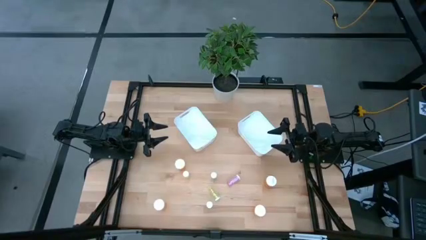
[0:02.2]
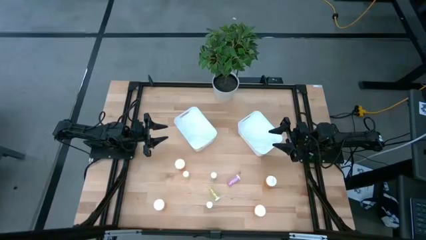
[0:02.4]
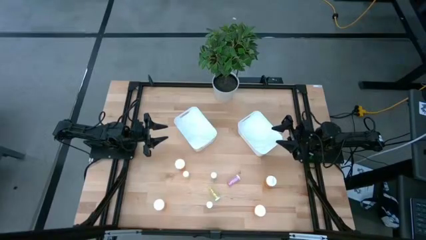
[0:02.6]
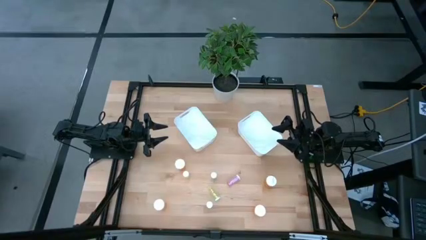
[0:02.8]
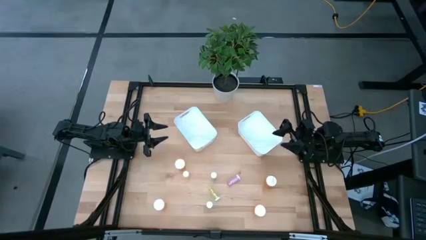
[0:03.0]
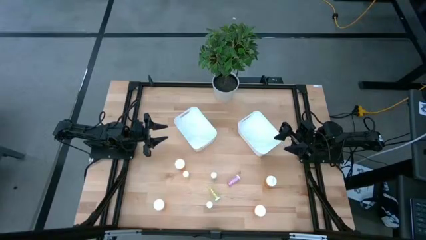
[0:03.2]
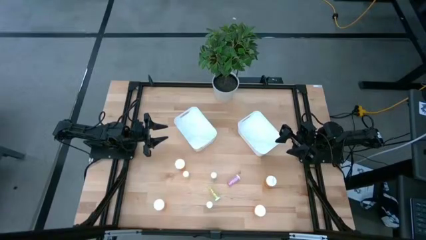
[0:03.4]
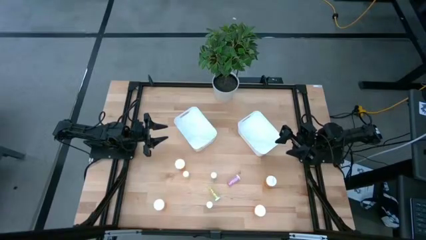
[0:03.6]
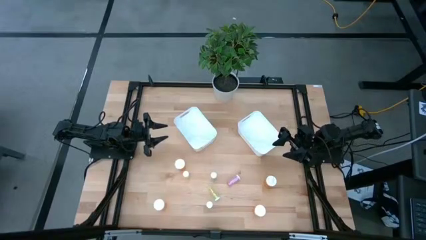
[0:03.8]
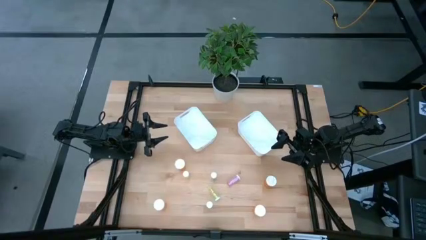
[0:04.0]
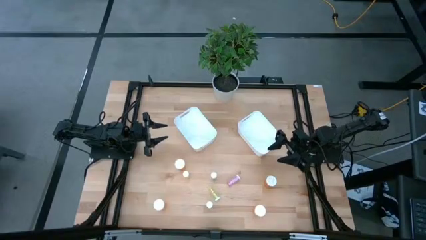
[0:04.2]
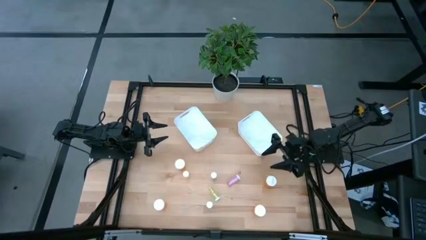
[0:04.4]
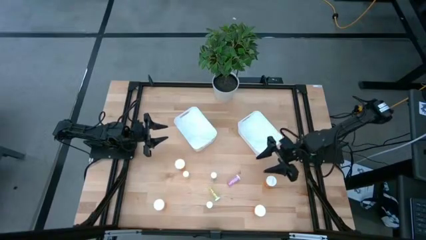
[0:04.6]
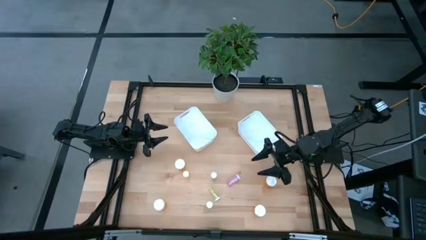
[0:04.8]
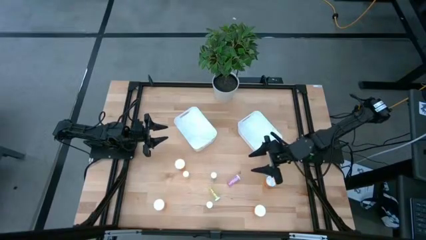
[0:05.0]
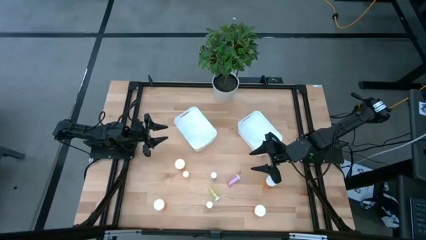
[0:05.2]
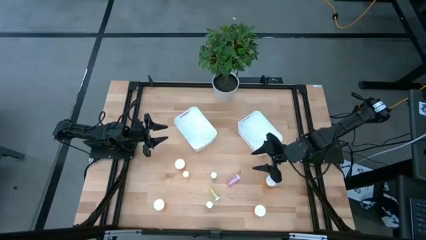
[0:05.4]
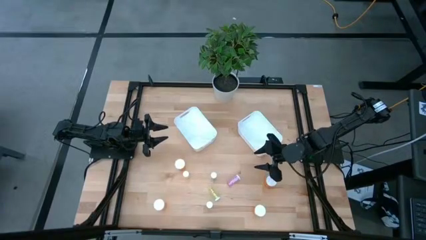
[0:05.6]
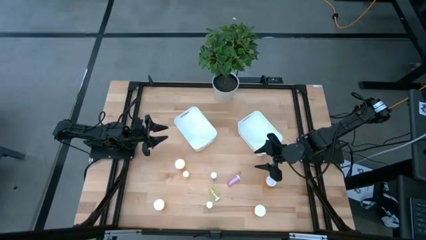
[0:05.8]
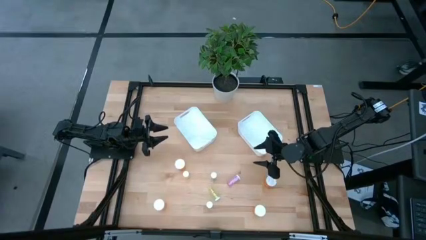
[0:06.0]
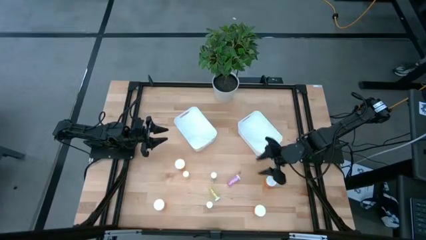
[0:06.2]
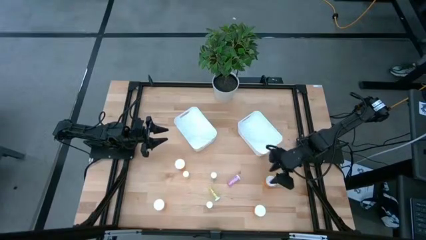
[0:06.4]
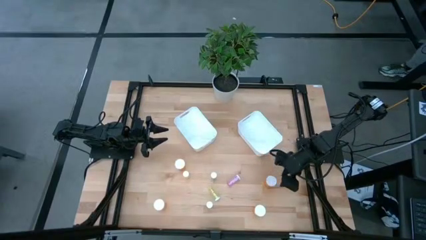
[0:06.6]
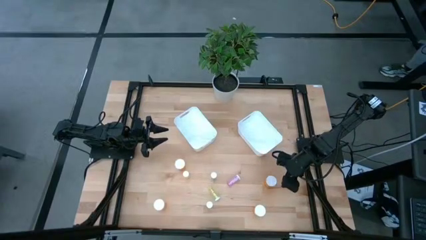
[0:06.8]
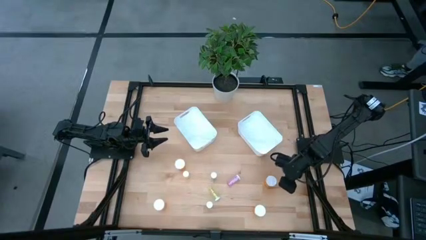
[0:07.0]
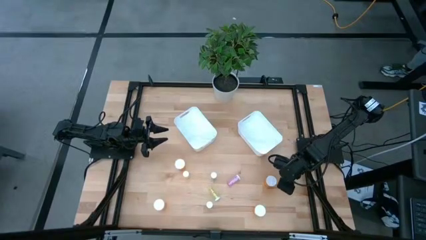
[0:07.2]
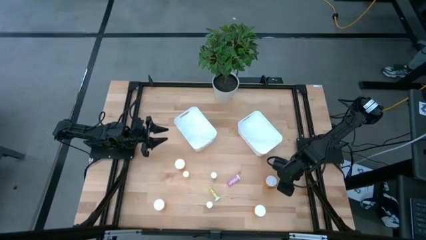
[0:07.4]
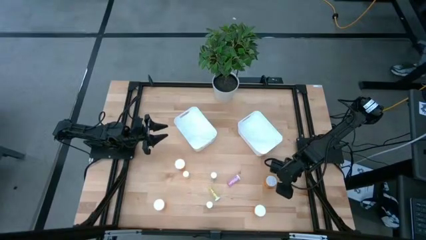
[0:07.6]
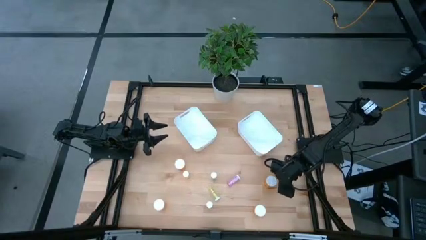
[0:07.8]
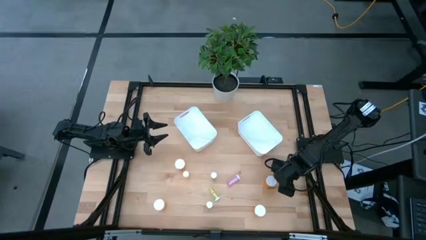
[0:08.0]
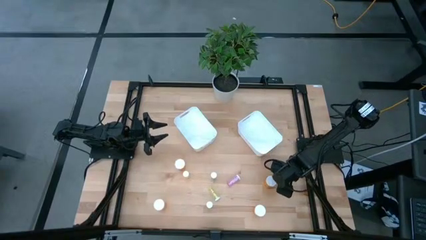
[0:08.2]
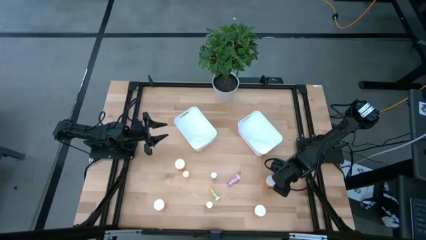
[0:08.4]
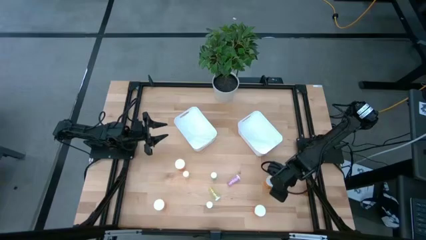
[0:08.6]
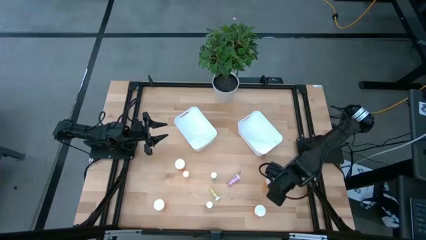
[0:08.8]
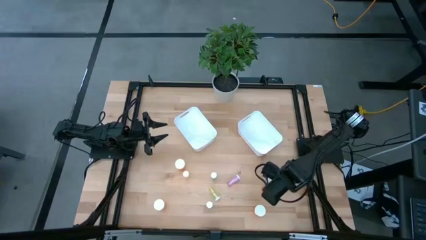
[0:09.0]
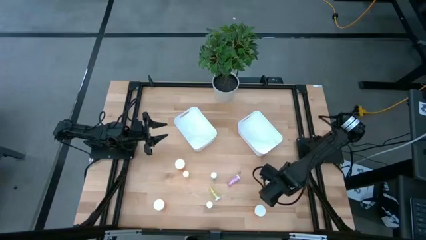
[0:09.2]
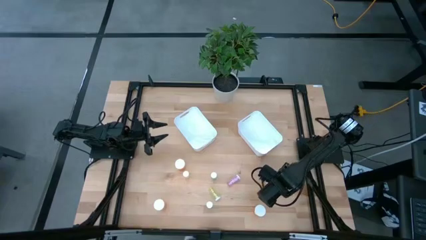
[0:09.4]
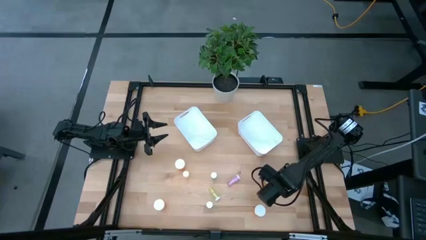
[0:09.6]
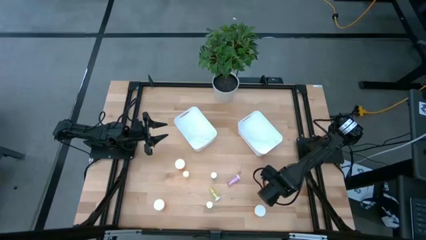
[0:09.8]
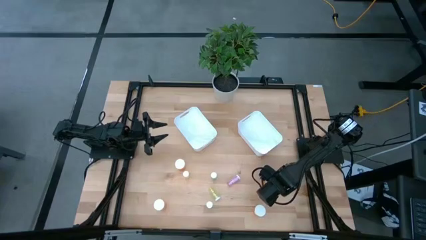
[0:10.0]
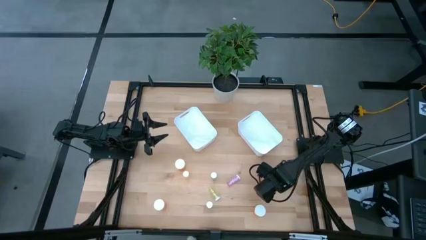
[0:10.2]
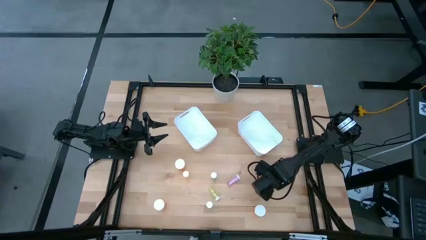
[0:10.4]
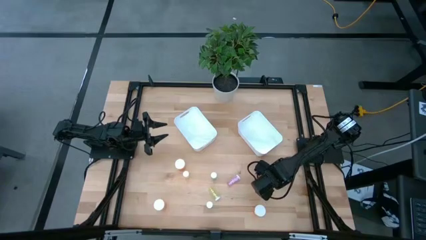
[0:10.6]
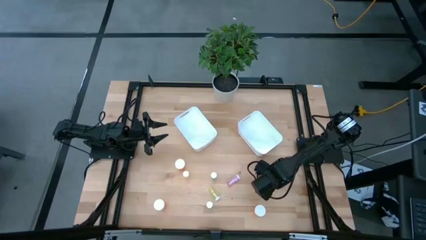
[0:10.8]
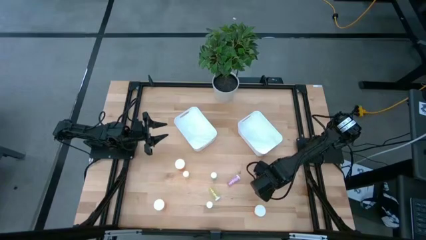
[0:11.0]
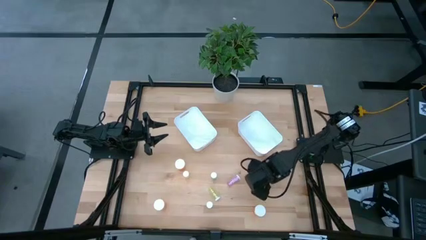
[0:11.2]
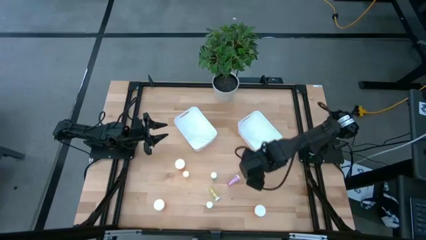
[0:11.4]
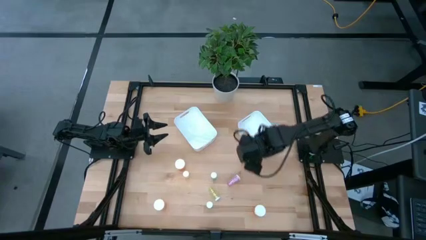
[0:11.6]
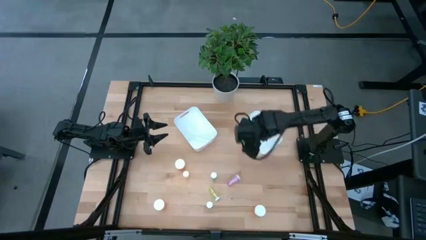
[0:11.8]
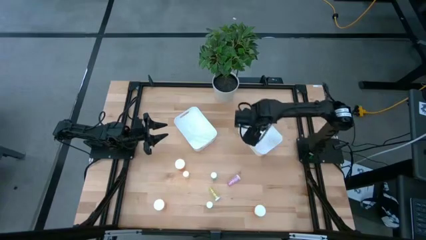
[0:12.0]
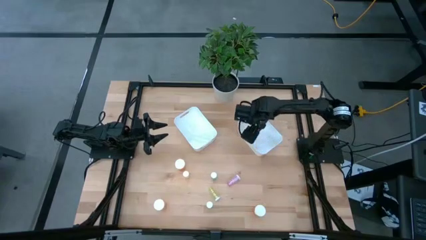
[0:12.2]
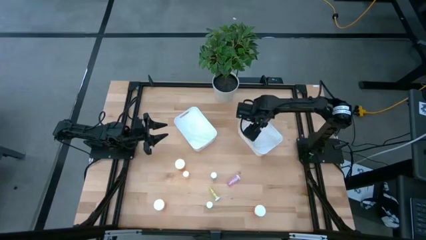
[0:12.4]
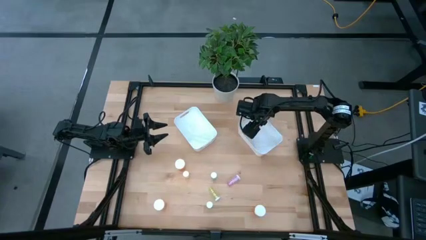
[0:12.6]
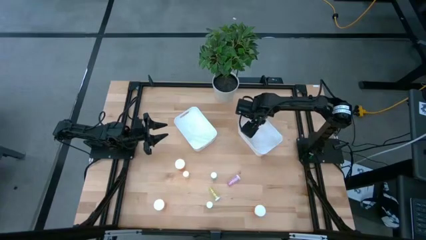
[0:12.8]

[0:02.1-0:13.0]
Task: Pick and place medicine bottles into bin by pill shape (circle, oval)
Put the top right orange pill bottle into the right white bin

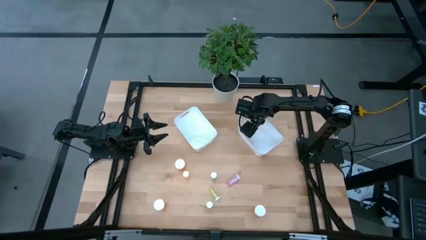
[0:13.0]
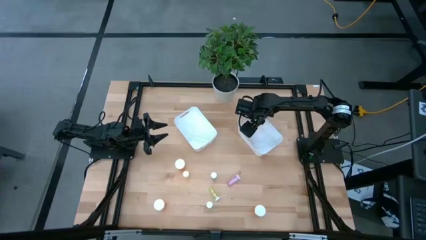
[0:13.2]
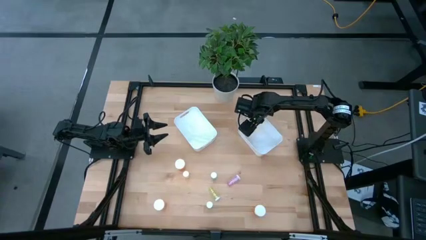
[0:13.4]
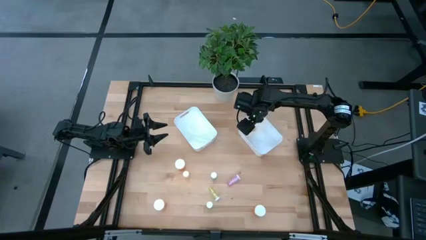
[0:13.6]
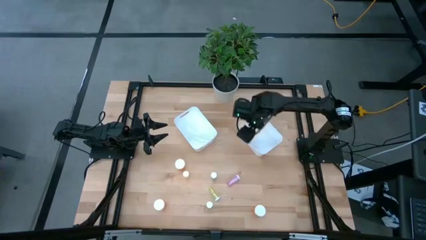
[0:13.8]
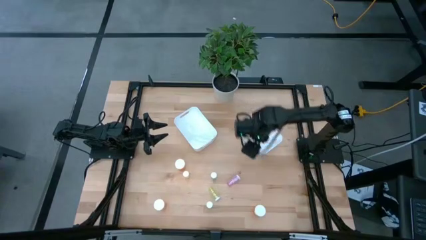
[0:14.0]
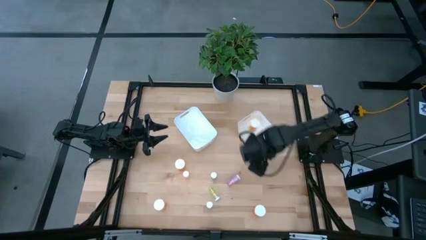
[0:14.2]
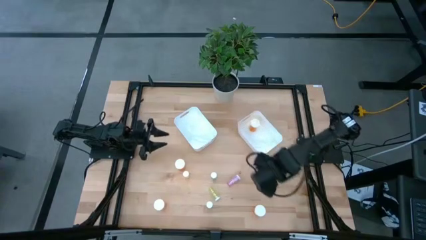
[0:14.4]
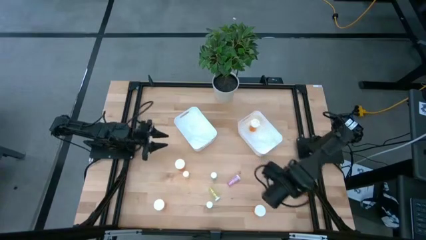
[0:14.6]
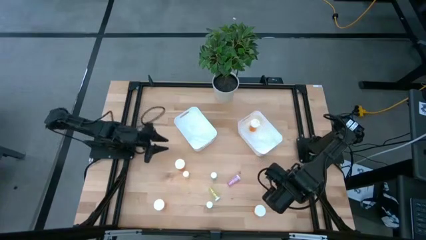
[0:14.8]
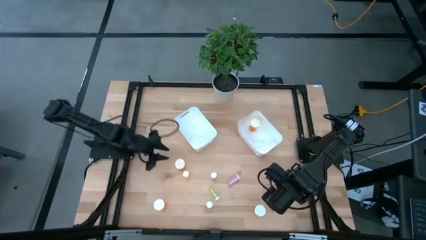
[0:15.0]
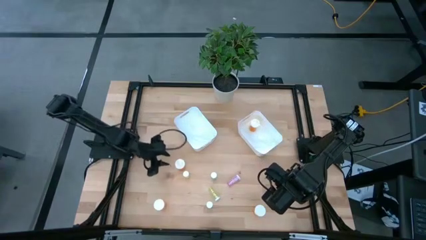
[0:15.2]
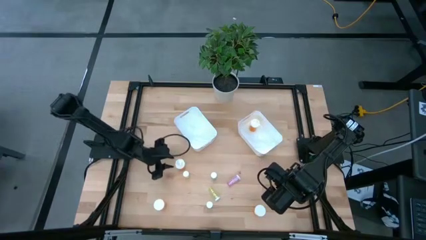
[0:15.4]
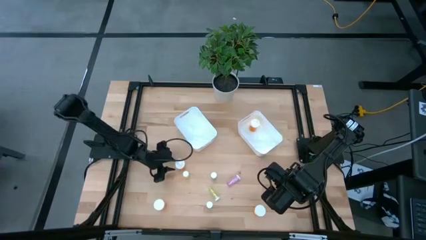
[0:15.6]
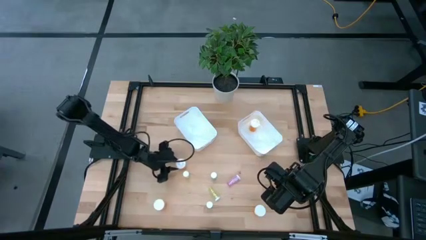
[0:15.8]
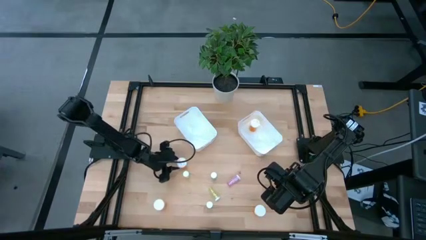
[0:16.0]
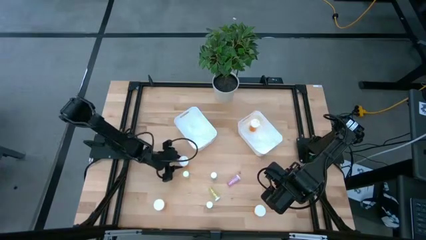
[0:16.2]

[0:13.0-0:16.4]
Put the top left orange pill bottle into the right white bin
